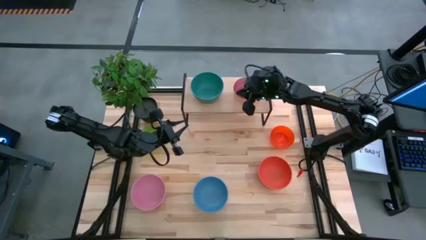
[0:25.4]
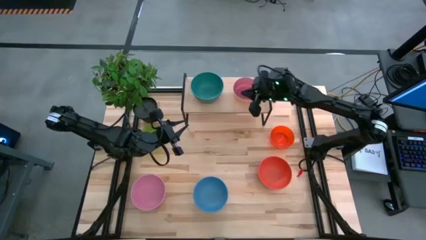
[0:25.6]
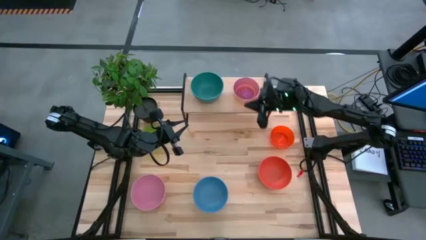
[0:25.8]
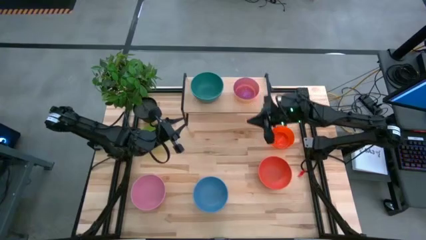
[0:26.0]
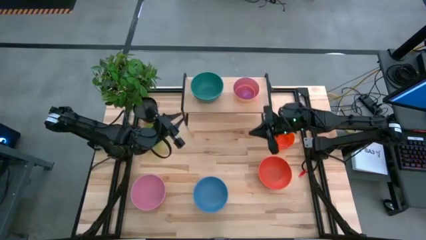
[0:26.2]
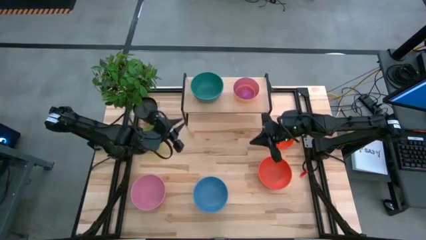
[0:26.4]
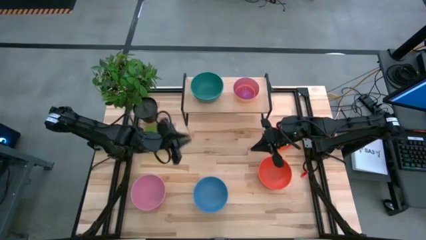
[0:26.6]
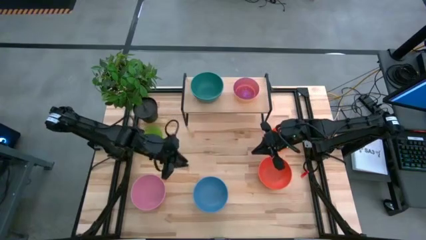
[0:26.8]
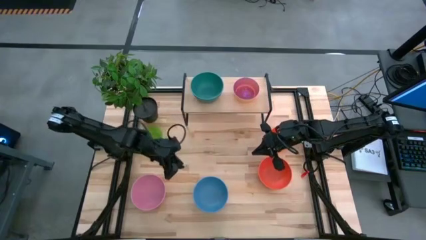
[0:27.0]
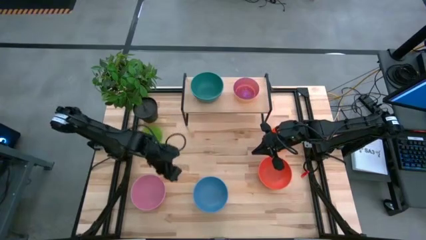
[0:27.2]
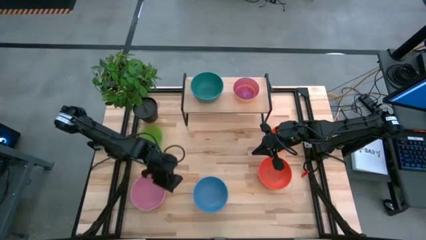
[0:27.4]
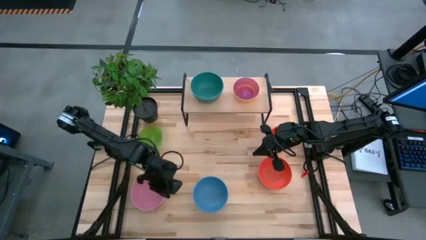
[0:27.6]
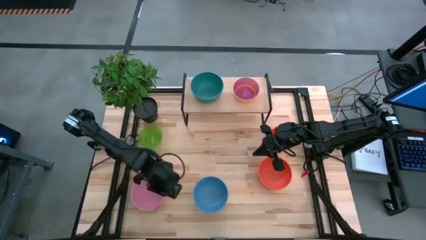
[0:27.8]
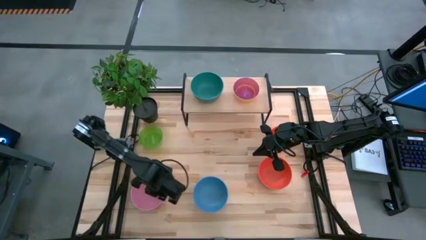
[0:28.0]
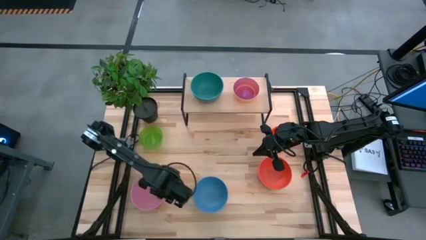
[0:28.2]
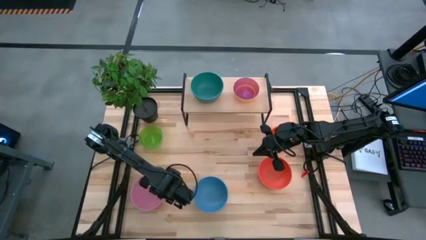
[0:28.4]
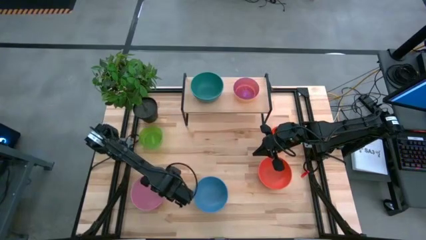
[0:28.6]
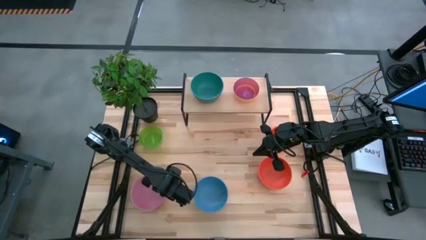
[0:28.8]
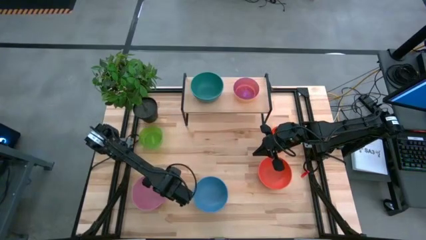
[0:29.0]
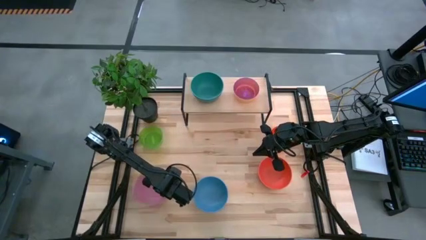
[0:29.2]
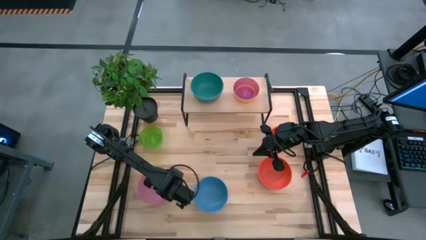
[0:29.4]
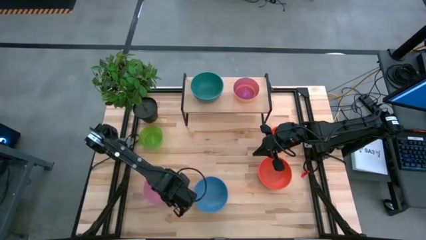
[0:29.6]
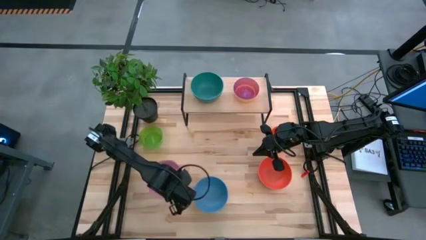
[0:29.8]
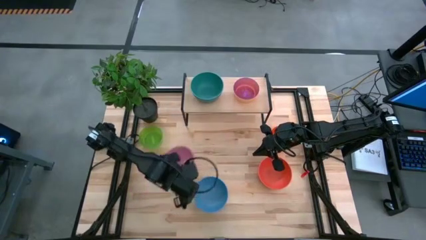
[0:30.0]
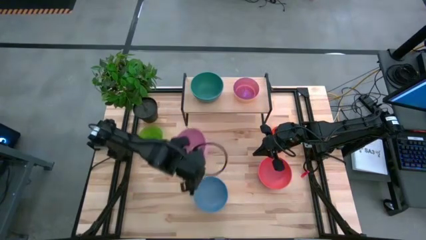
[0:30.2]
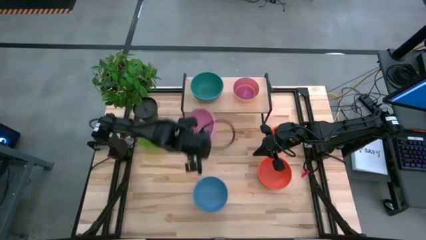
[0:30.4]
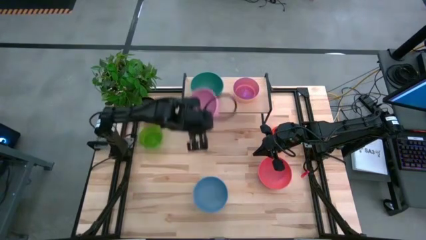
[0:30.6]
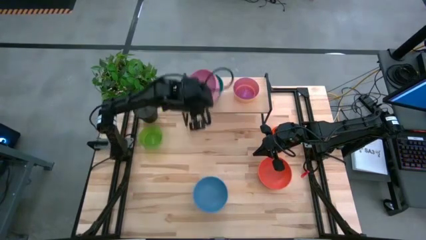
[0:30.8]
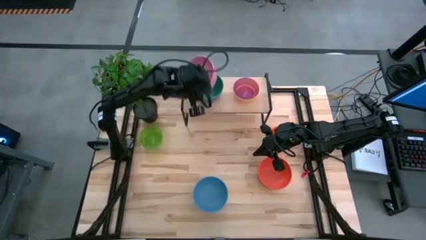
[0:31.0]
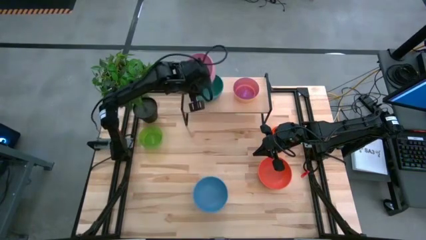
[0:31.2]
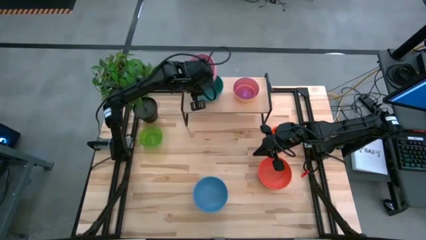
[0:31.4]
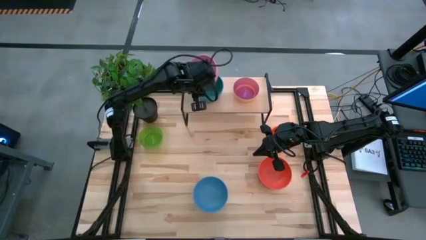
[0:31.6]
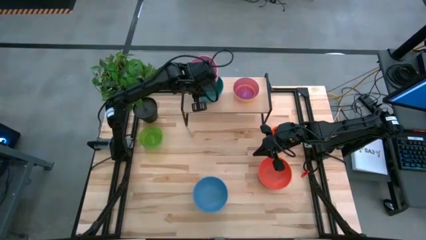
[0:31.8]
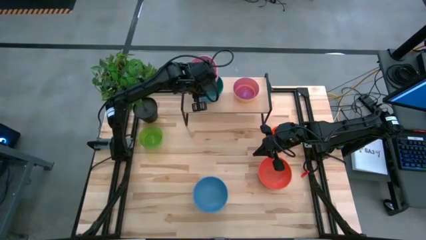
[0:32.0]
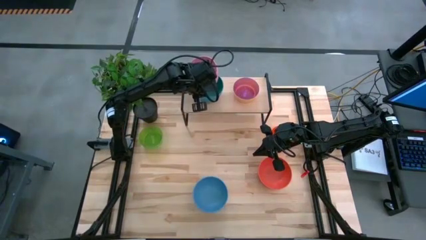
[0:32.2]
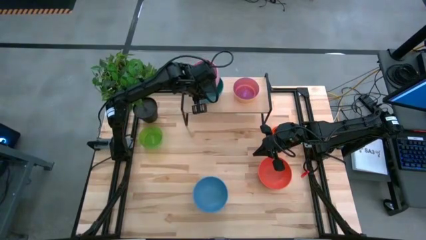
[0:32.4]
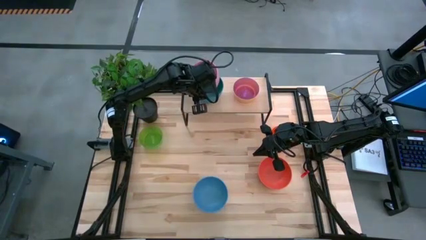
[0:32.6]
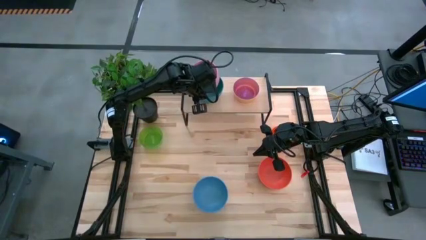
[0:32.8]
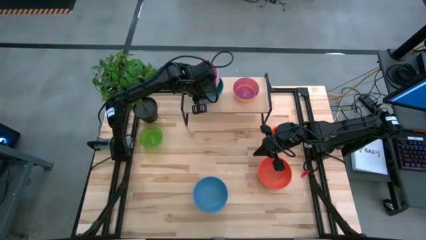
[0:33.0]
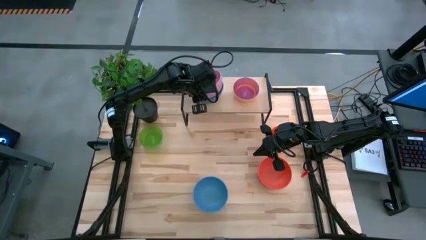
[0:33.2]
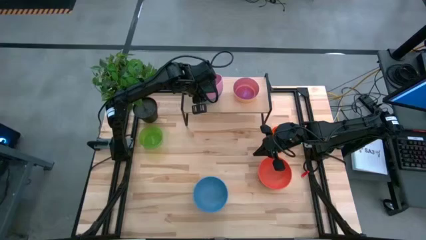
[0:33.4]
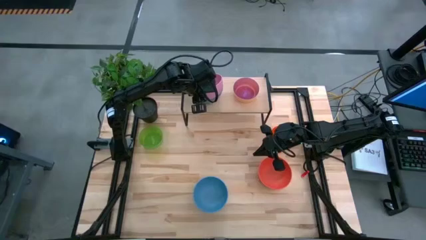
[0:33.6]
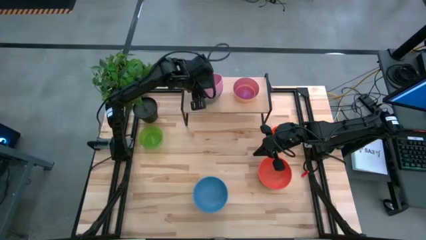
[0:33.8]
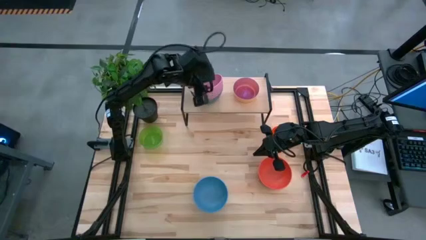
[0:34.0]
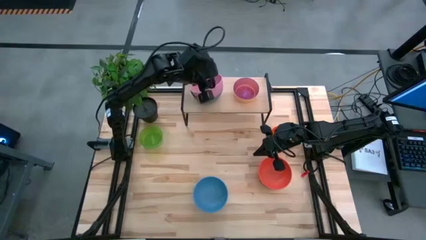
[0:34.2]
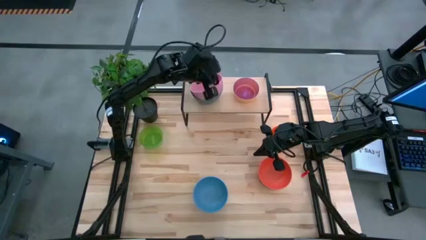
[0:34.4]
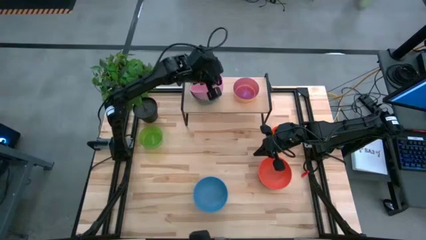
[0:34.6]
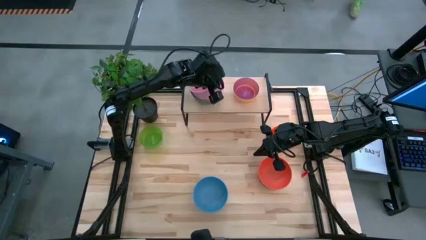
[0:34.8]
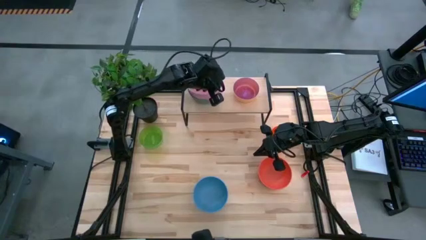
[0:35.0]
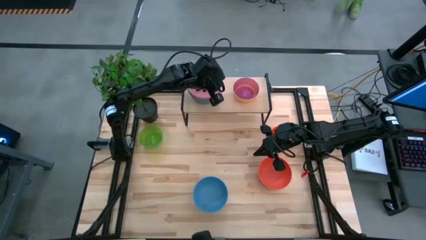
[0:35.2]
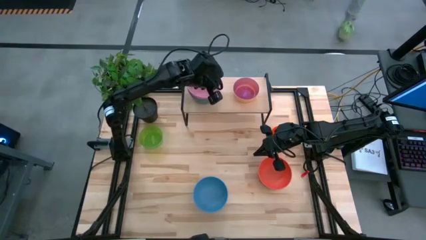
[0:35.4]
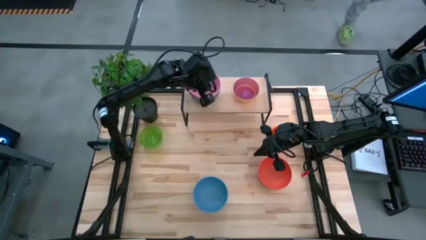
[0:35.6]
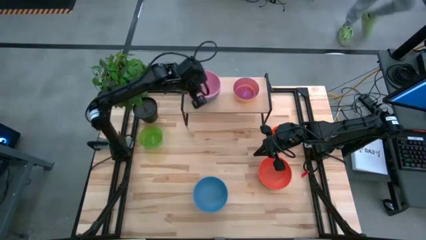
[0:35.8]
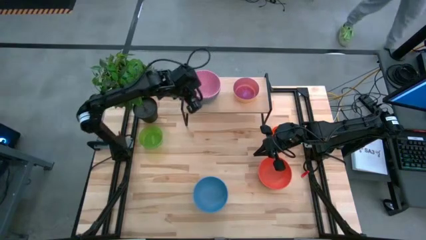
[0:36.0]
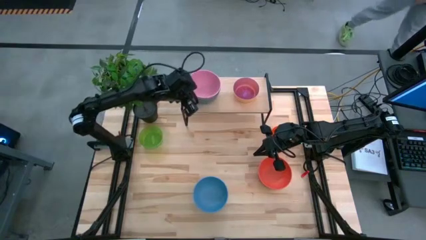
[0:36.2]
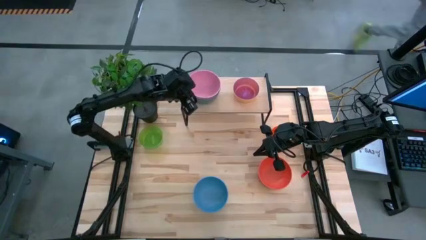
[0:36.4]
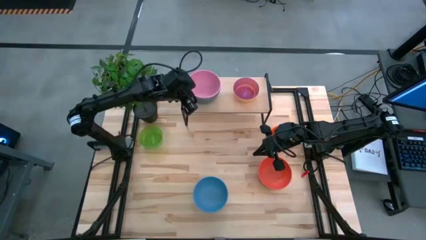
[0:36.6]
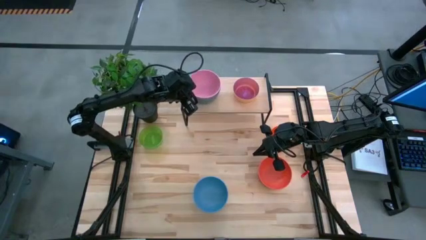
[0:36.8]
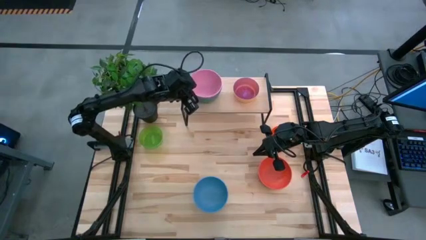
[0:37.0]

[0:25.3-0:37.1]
Task: Place and stack bowls onto a shelf
Stack the big pink bowl on top of the big dark green bowl on the shelf

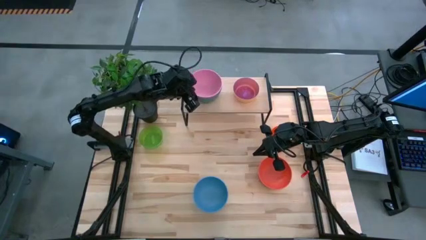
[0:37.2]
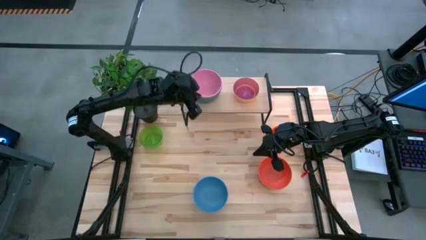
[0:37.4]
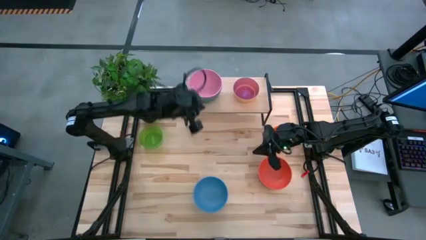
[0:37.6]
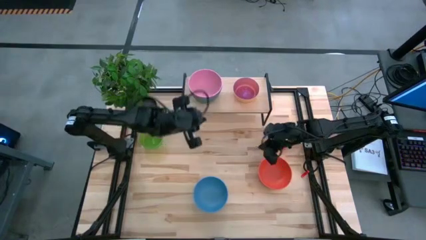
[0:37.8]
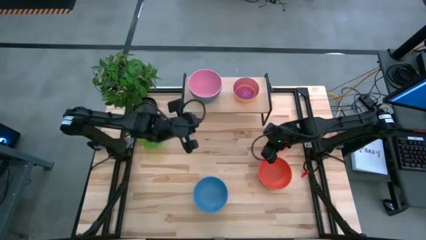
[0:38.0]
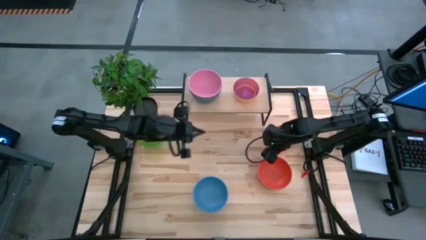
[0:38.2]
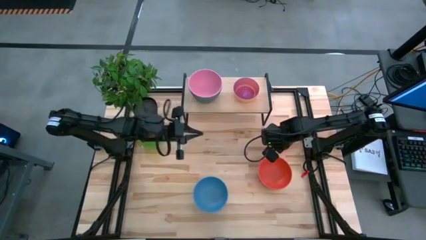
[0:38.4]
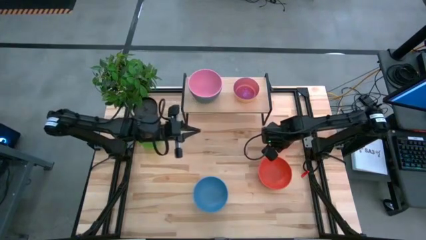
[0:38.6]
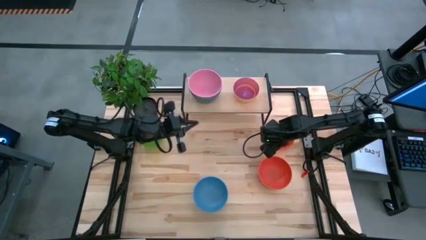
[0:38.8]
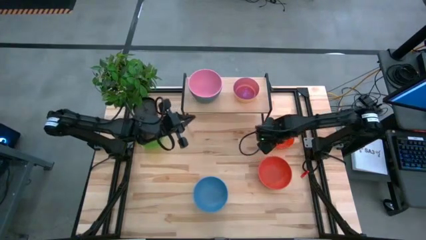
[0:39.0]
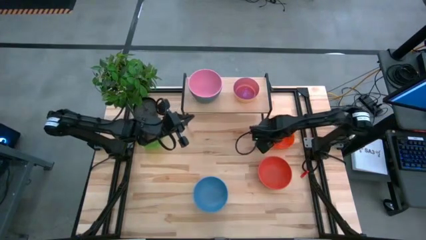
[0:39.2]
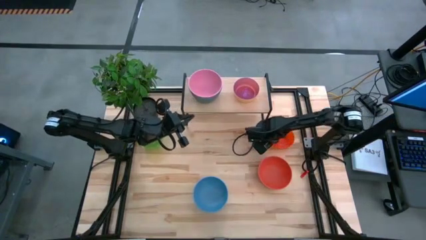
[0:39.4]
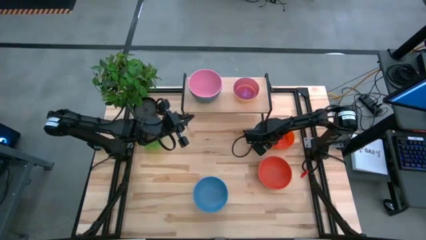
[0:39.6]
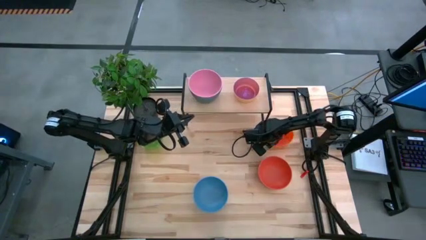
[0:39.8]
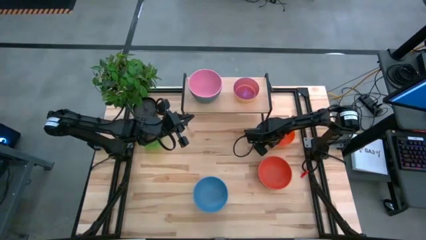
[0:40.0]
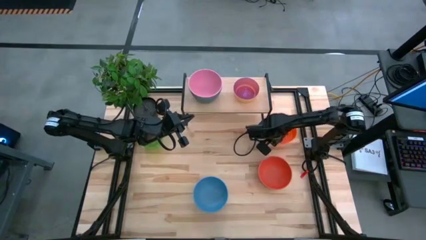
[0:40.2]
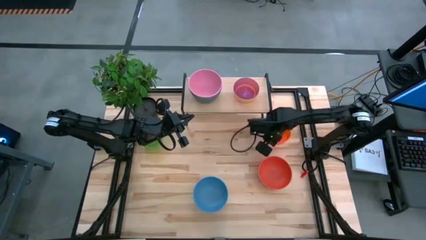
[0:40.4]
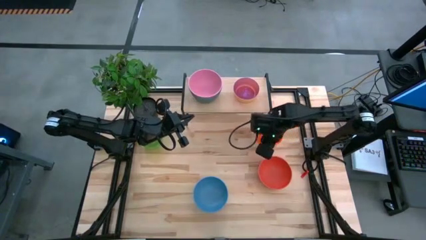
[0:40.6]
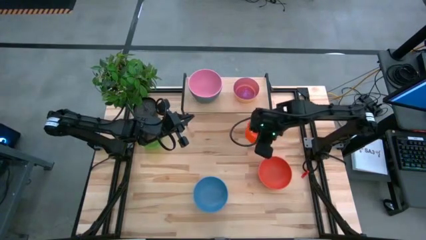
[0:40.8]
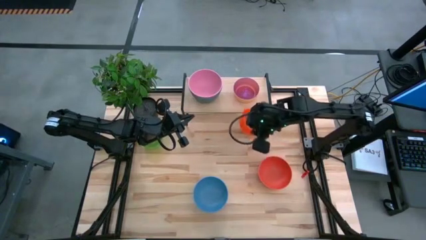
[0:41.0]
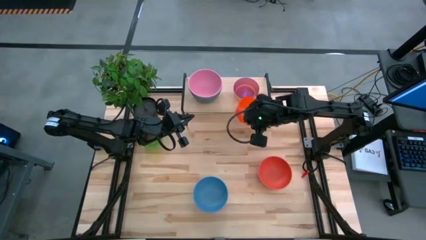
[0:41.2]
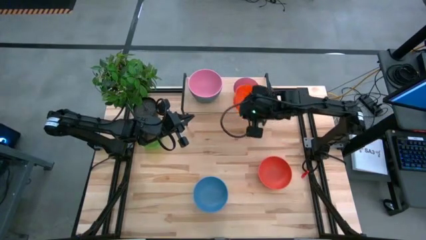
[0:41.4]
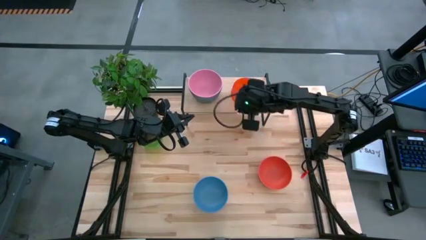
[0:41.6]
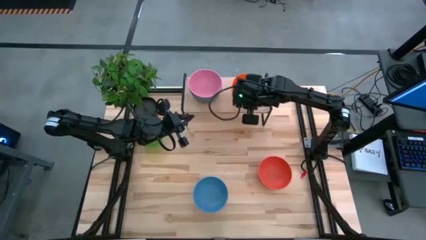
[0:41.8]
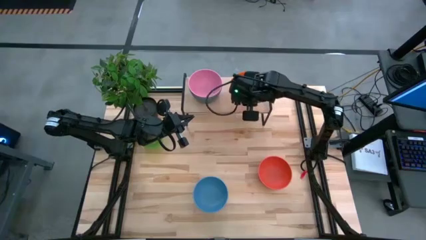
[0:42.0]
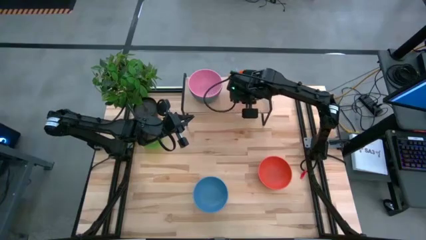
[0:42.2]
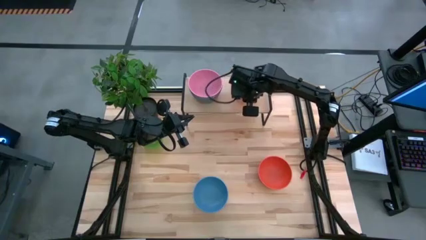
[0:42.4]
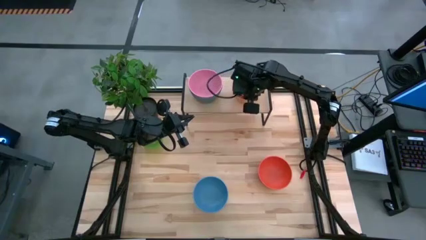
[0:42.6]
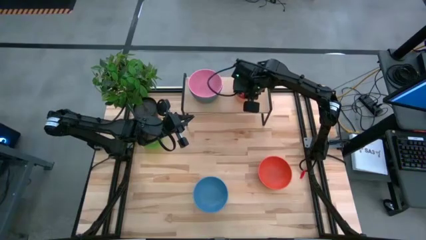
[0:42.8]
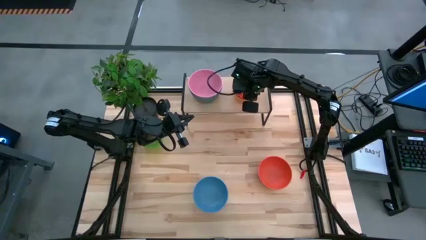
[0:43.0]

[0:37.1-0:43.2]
Stack the small orange bowl on top of the small purple bowl
